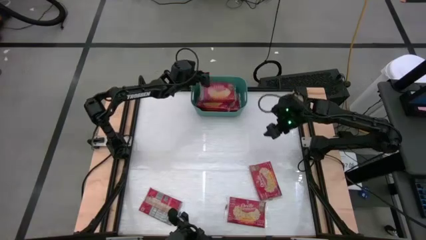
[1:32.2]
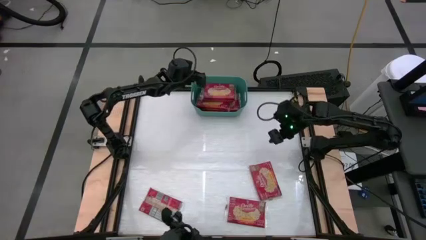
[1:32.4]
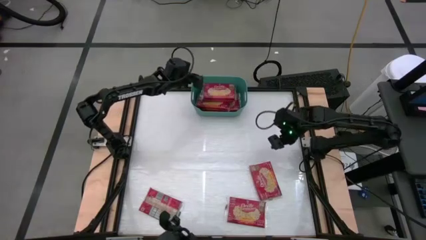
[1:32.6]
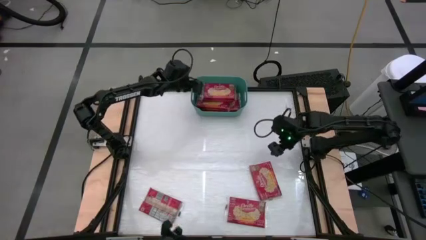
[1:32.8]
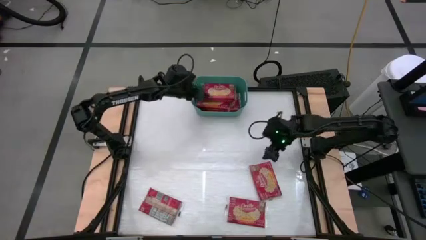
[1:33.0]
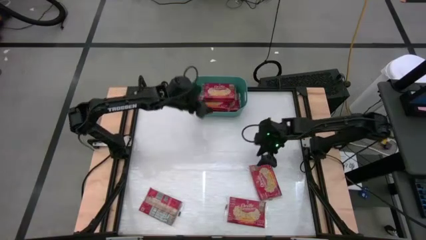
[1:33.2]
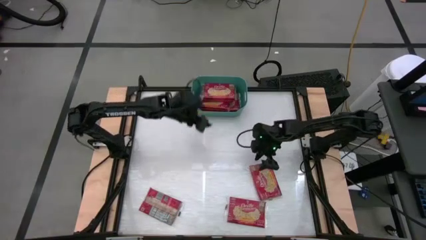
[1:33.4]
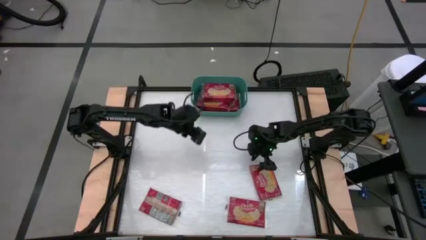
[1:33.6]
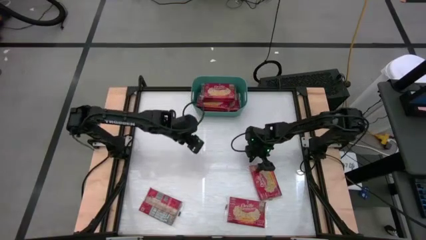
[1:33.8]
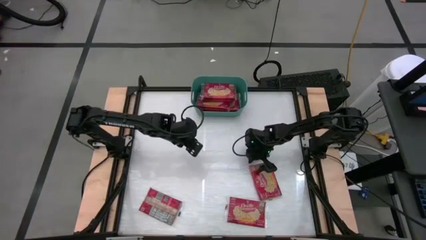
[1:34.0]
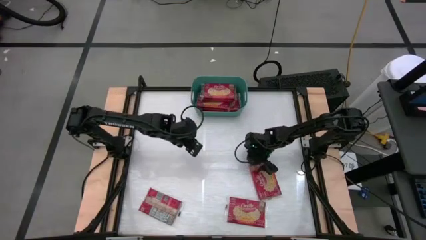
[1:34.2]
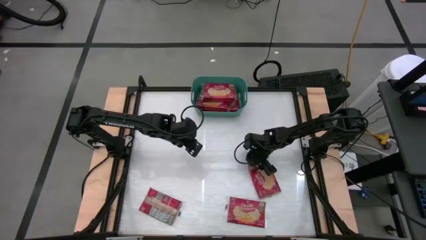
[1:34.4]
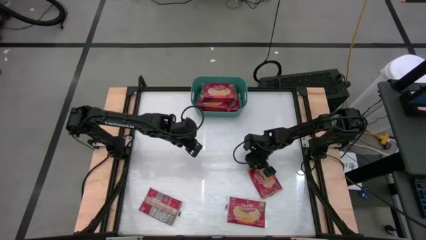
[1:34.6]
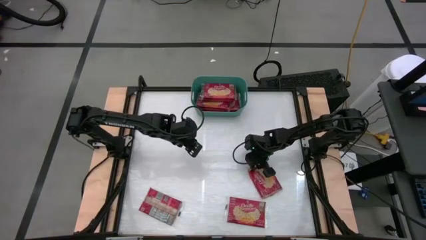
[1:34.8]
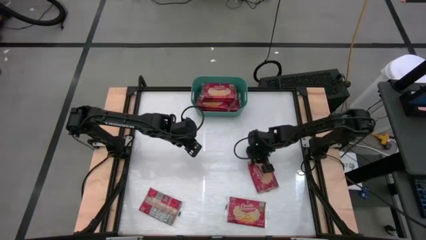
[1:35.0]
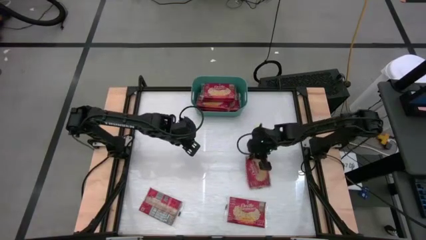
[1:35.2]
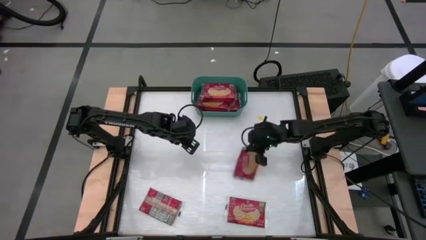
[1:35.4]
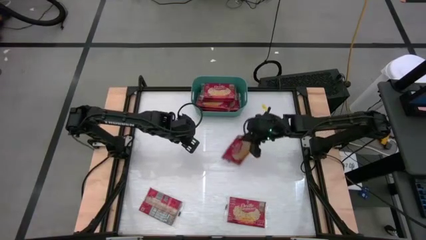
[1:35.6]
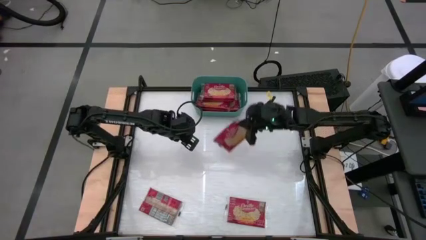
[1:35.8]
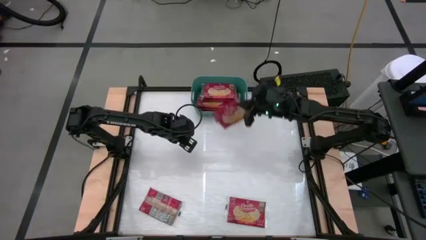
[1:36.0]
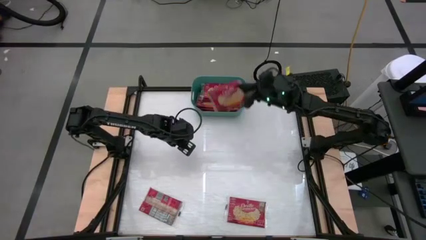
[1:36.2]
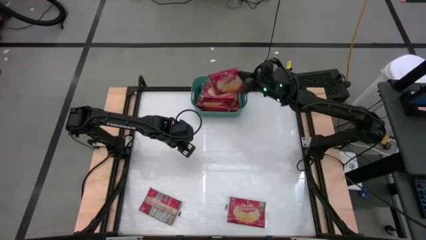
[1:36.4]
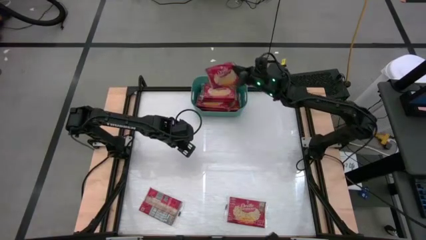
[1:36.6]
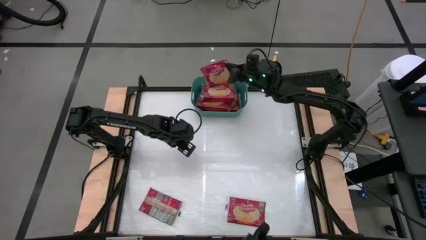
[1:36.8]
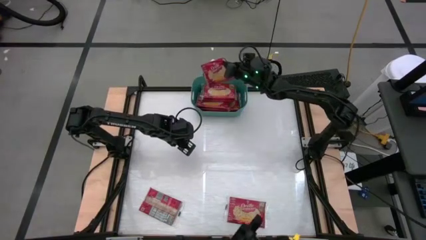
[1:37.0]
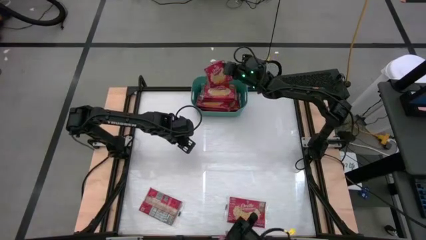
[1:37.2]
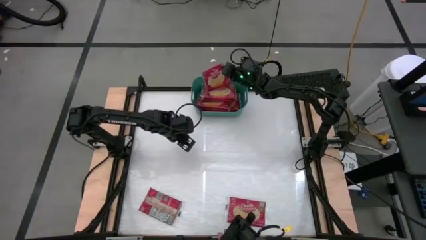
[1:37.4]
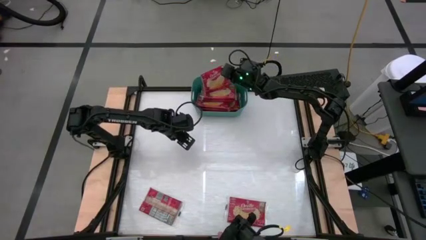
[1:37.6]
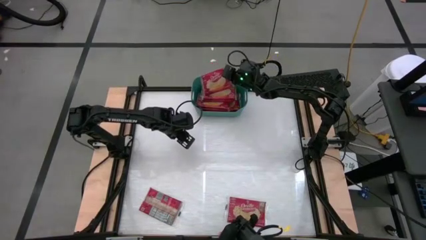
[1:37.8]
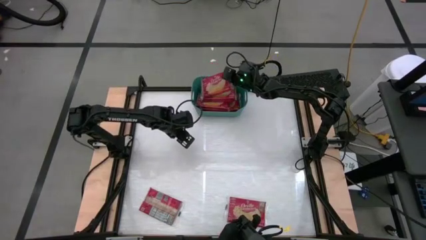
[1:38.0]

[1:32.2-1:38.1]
Task: Sort popcorn bags into baskets
Put the popcorn bag into the green bin

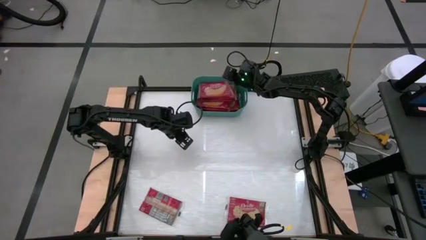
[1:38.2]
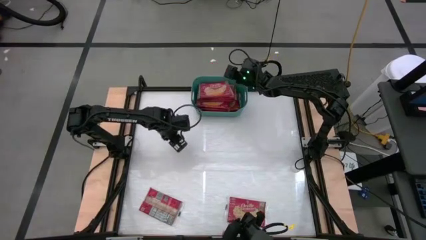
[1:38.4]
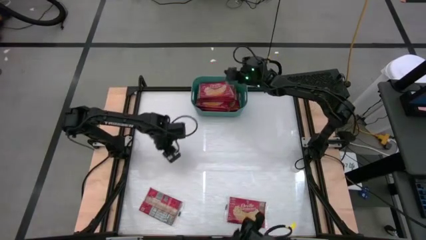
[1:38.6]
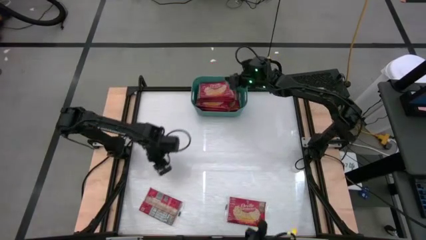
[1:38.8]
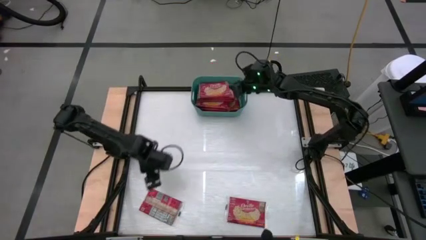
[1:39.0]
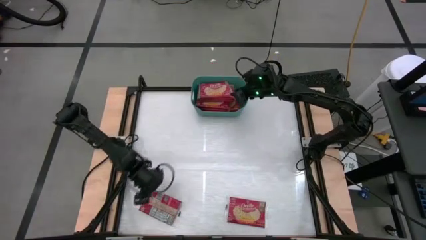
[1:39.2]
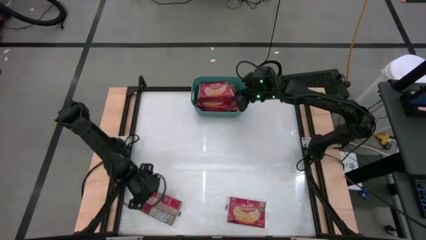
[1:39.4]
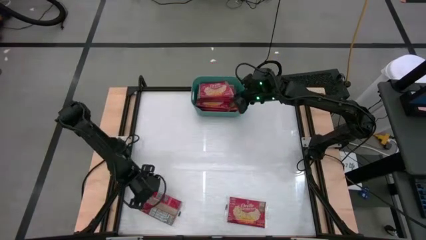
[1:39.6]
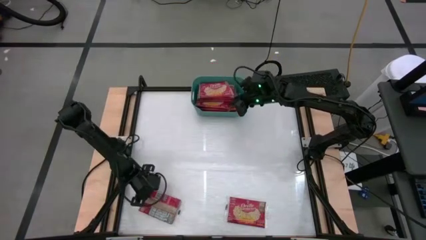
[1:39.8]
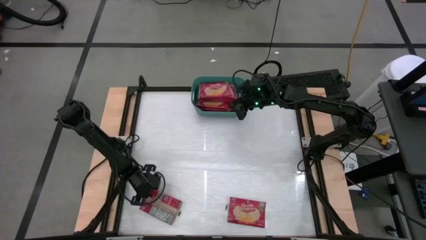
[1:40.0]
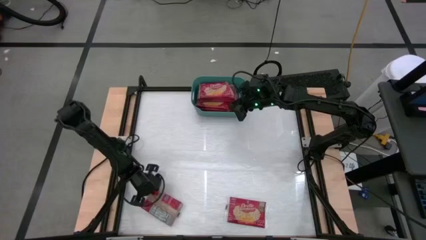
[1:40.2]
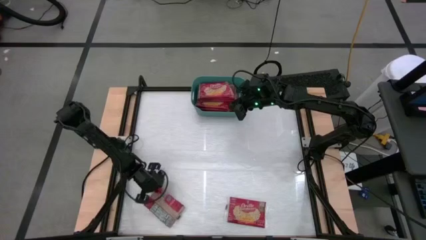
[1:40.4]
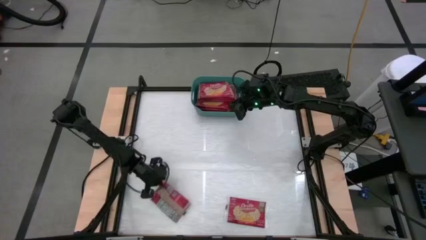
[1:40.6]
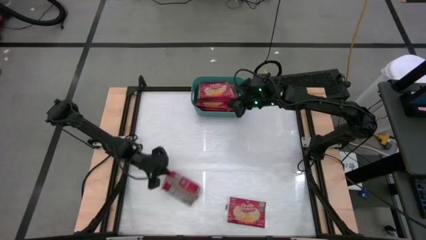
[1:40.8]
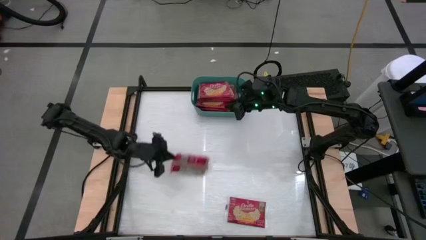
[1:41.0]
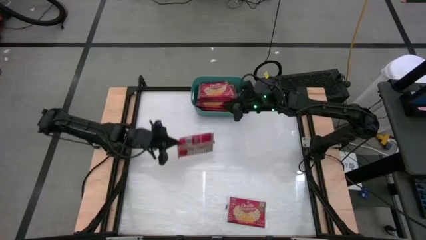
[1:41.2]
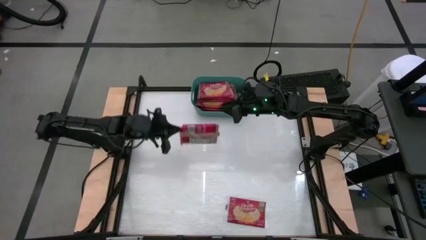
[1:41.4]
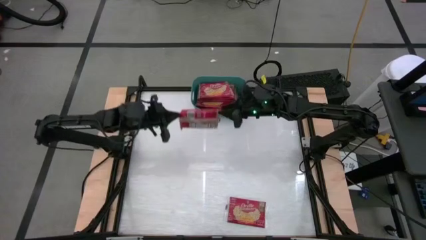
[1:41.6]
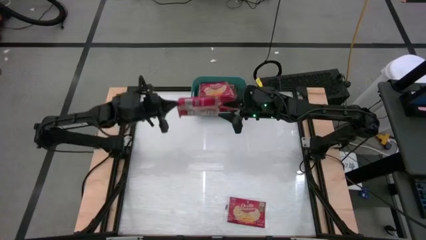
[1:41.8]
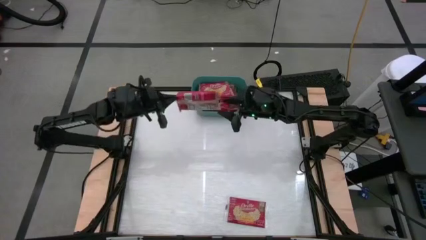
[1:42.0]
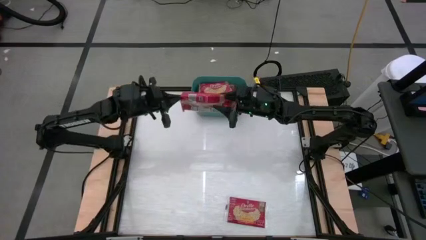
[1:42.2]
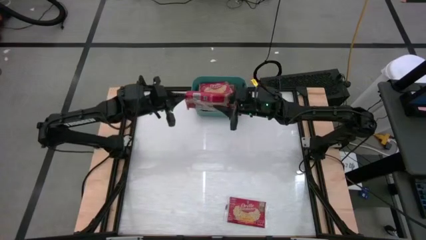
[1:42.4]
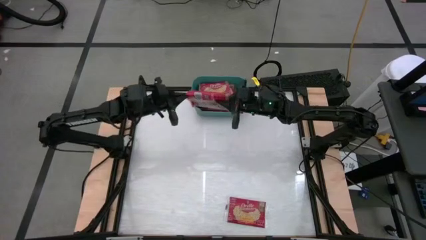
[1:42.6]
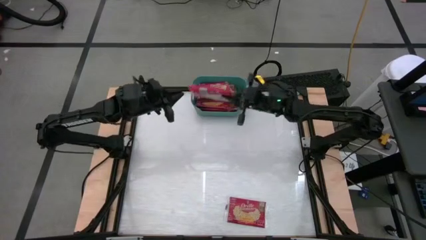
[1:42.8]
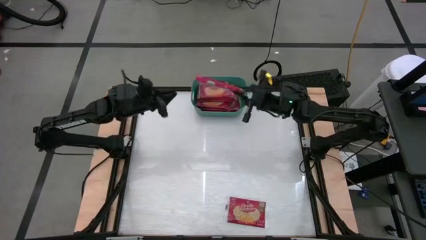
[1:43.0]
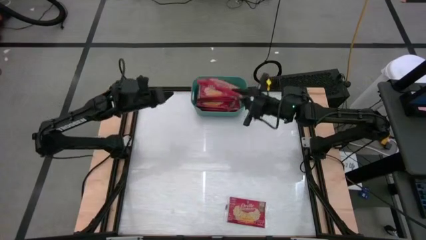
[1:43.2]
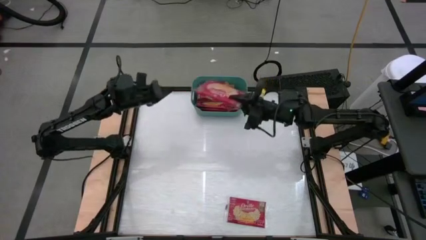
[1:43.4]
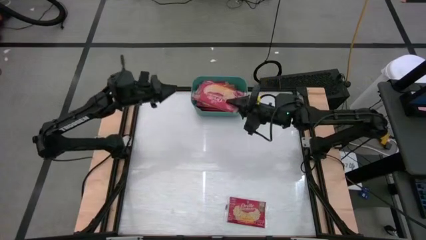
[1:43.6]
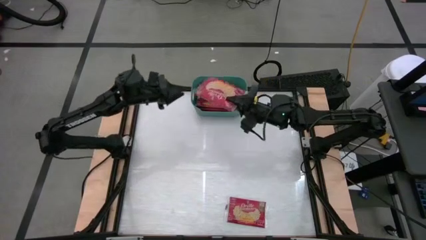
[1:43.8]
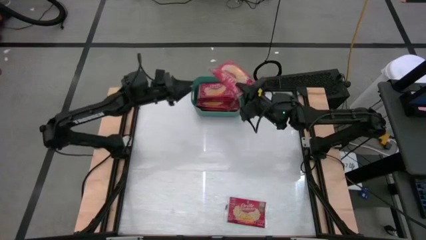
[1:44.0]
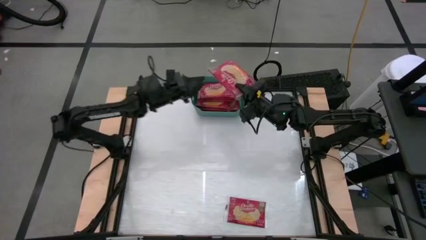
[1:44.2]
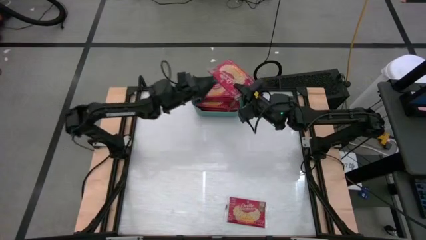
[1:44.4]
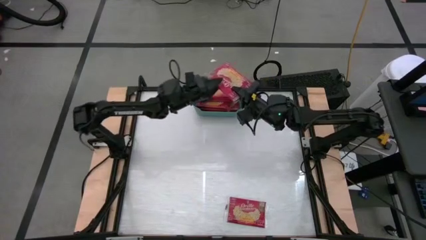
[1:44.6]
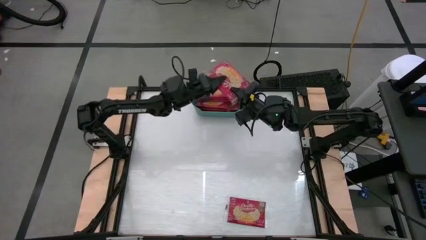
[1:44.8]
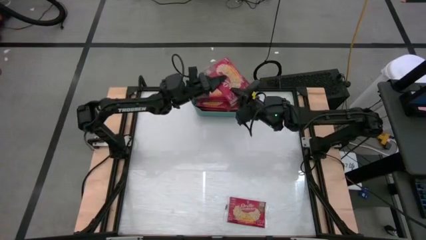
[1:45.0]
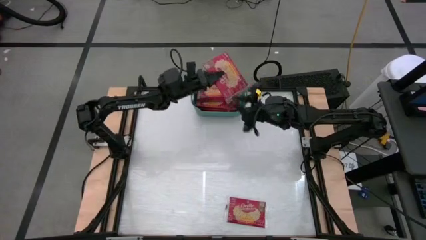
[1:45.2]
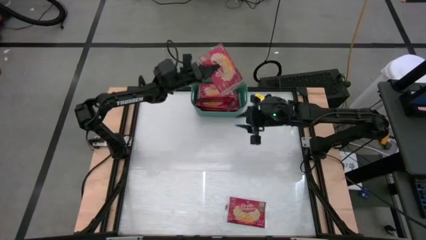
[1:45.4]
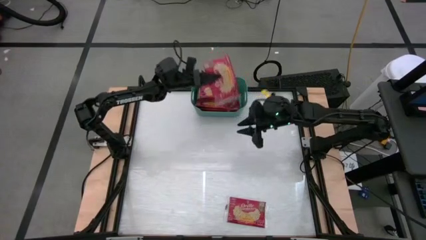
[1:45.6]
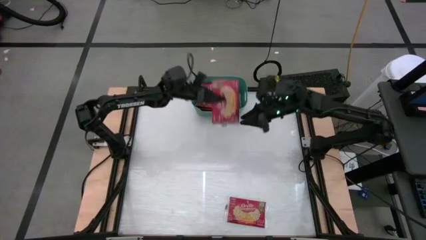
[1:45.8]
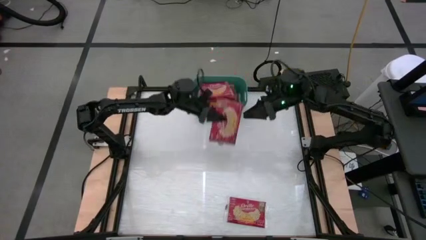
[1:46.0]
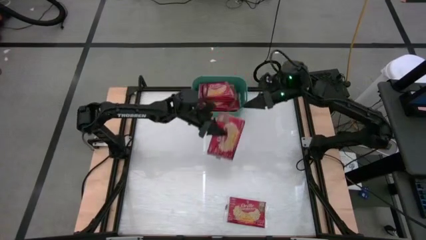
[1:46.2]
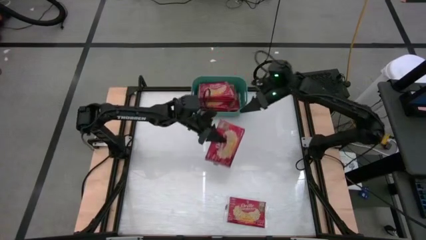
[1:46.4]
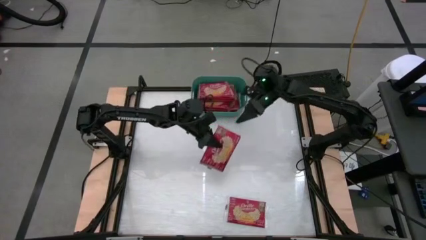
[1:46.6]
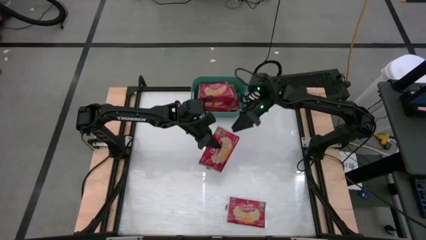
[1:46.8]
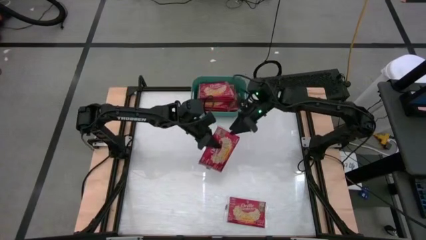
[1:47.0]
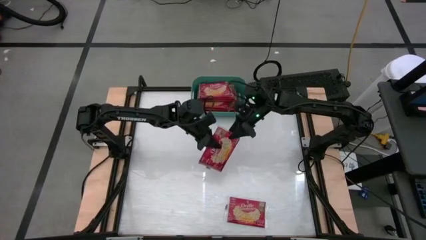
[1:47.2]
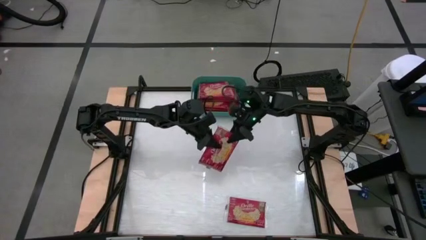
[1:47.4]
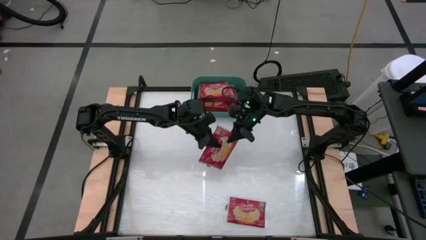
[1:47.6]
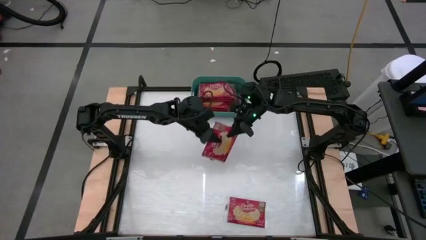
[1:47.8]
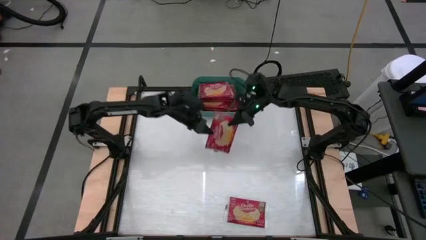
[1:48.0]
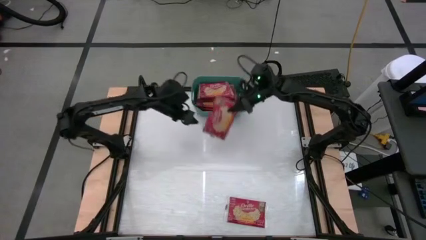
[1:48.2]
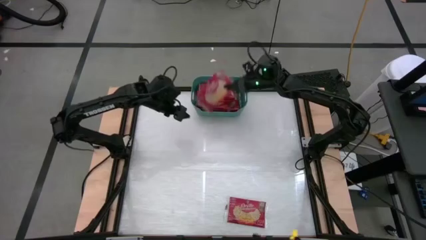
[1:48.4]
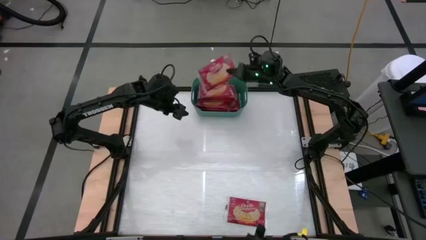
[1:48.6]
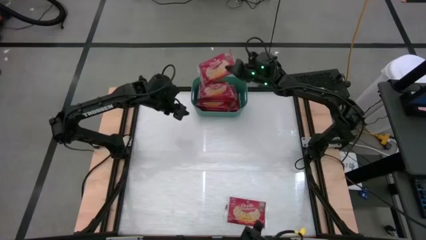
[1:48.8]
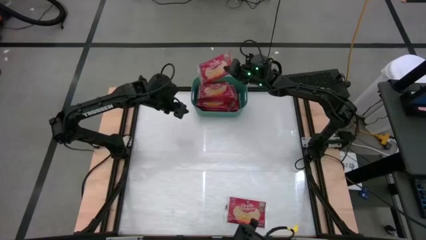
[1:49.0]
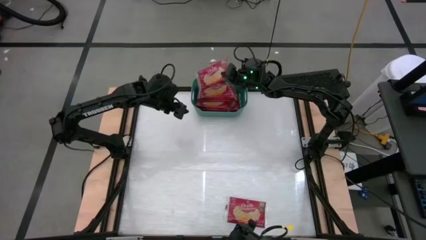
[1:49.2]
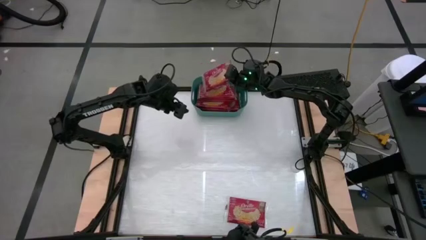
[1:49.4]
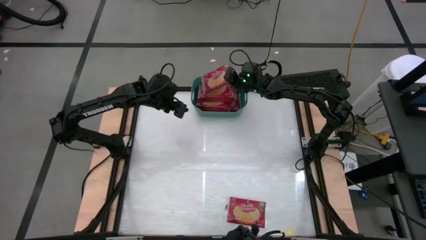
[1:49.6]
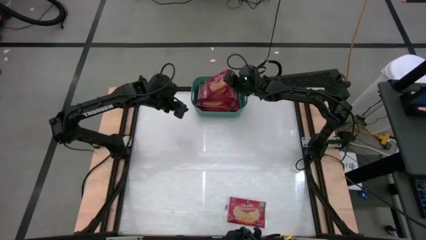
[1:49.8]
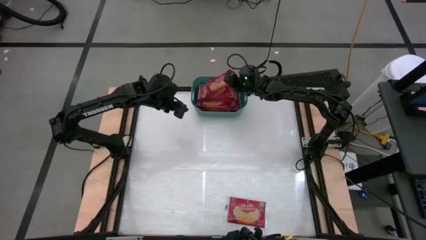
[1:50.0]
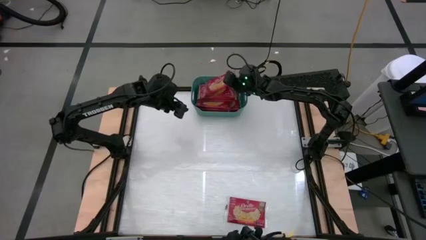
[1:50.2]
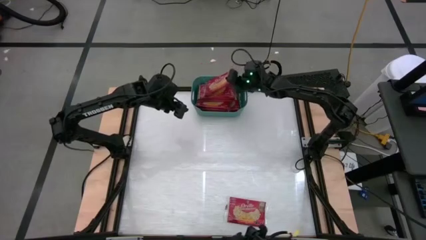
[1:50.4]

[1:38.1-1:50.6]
Put the popcorn bag into the green bin
